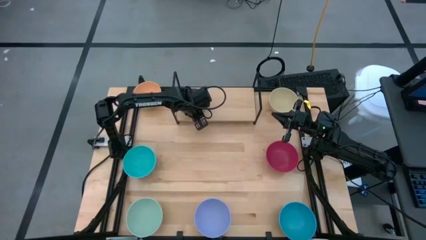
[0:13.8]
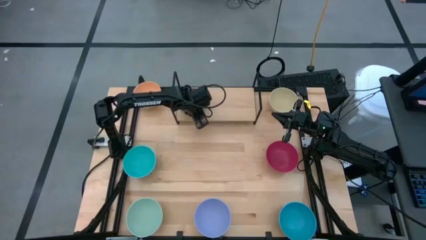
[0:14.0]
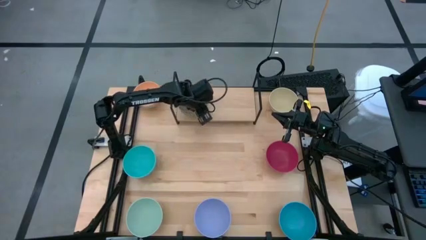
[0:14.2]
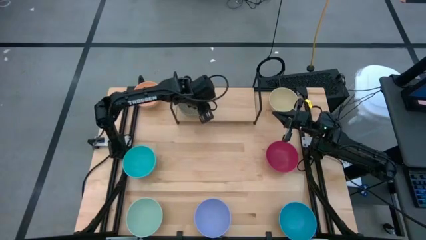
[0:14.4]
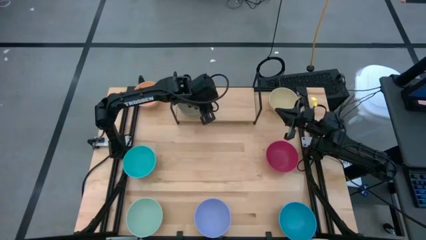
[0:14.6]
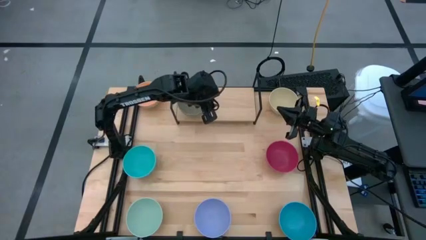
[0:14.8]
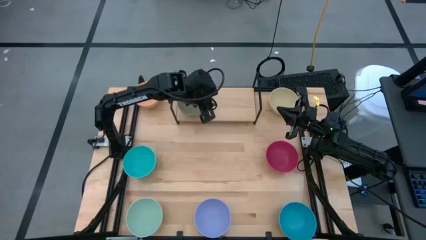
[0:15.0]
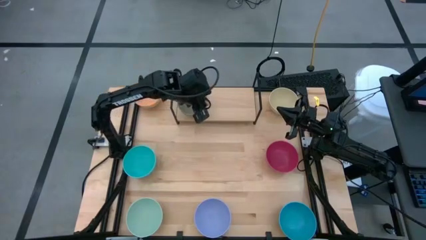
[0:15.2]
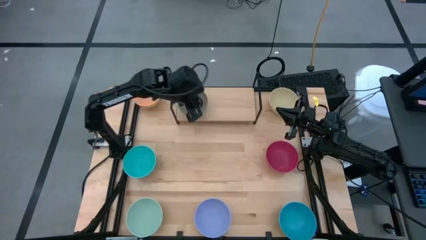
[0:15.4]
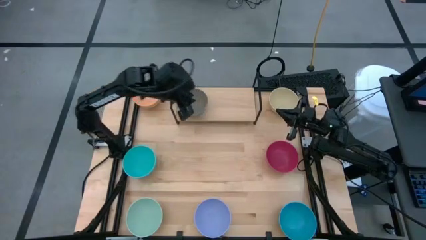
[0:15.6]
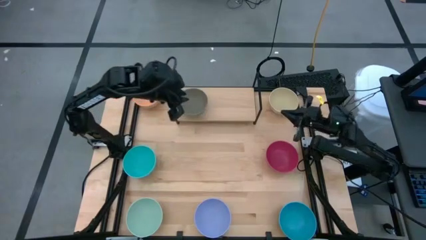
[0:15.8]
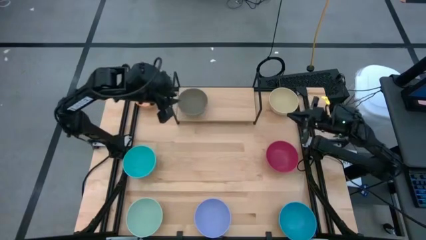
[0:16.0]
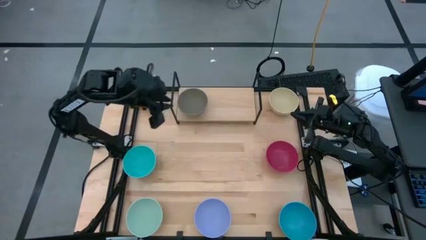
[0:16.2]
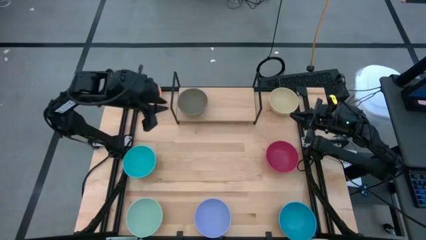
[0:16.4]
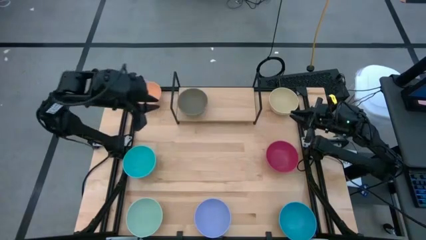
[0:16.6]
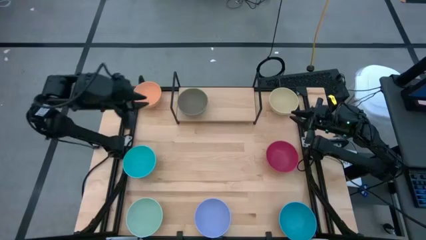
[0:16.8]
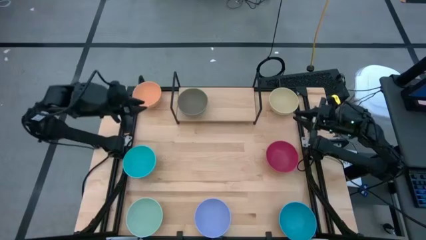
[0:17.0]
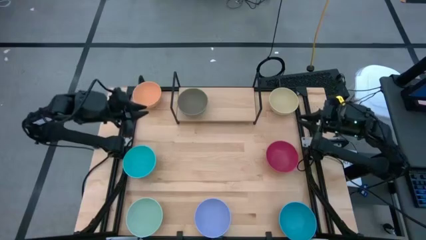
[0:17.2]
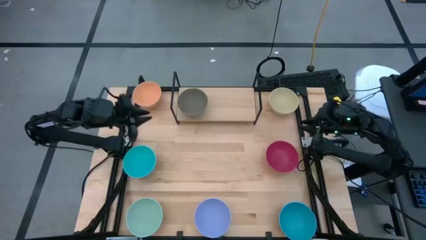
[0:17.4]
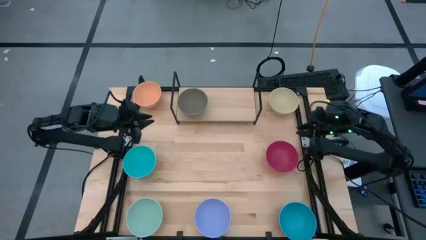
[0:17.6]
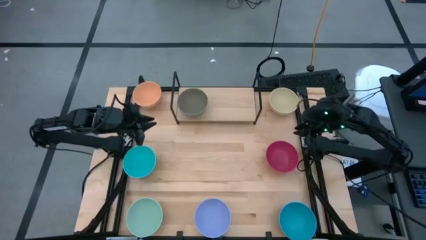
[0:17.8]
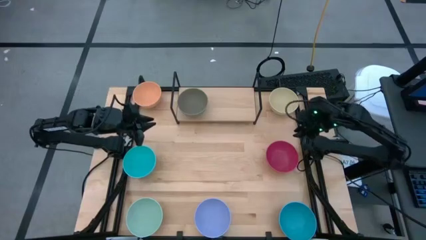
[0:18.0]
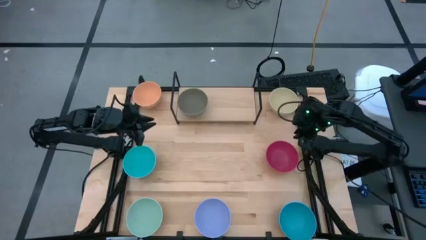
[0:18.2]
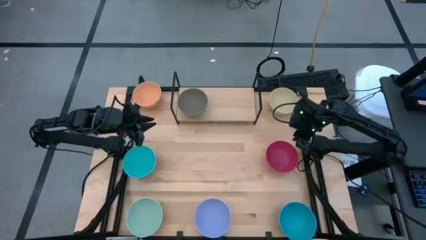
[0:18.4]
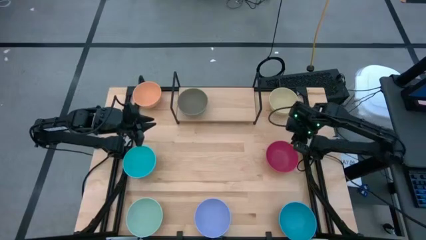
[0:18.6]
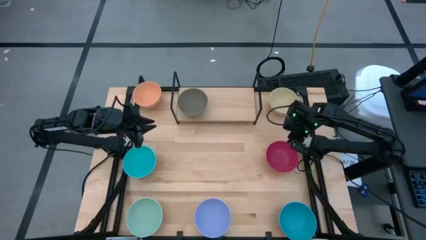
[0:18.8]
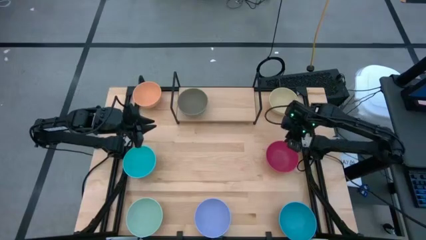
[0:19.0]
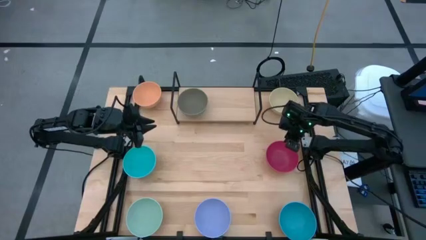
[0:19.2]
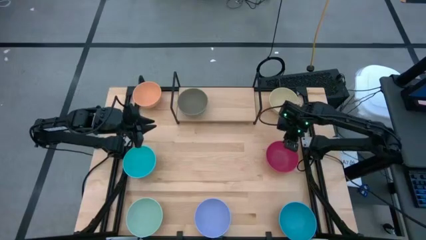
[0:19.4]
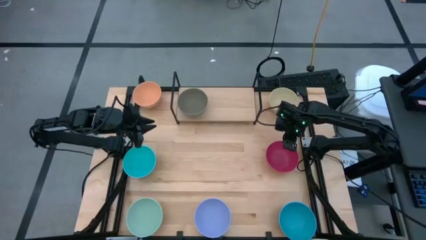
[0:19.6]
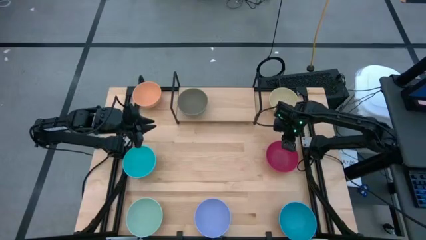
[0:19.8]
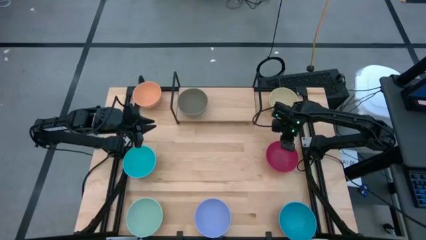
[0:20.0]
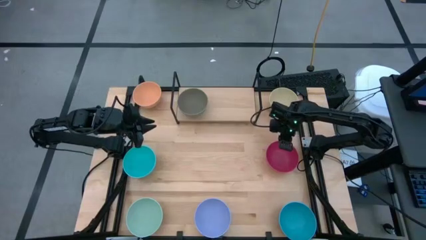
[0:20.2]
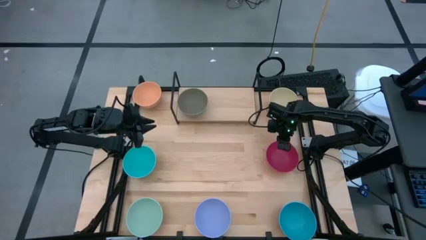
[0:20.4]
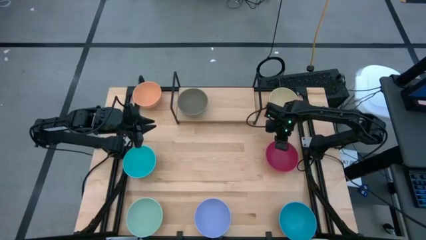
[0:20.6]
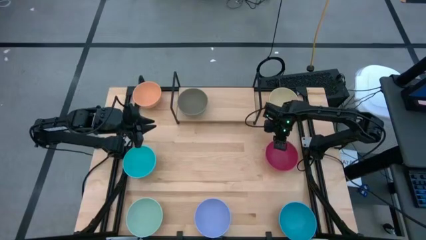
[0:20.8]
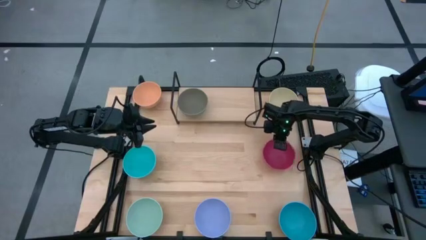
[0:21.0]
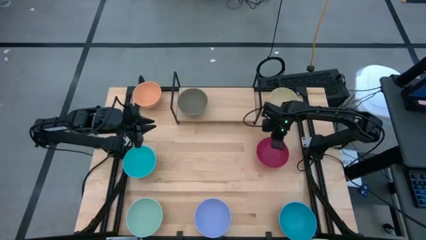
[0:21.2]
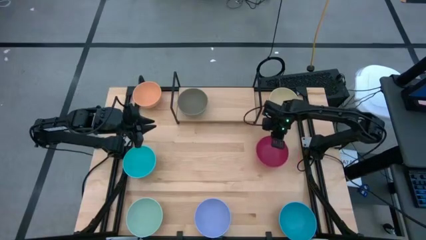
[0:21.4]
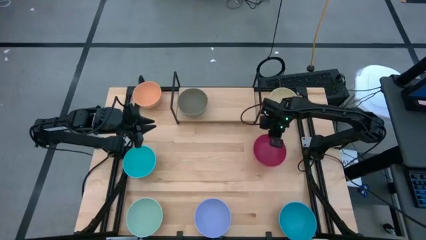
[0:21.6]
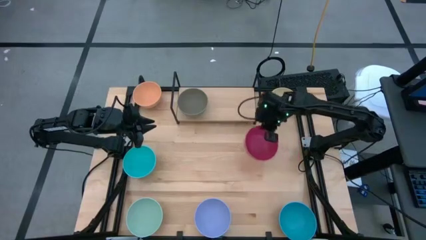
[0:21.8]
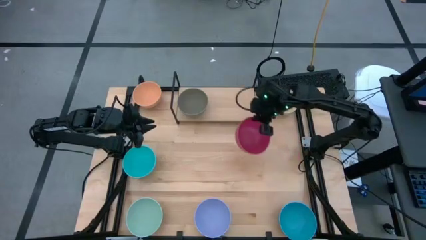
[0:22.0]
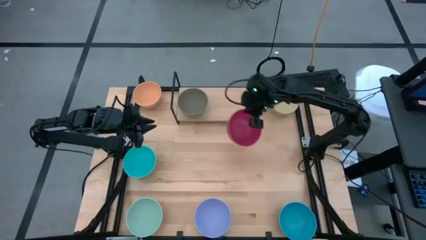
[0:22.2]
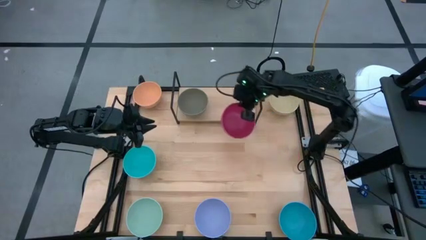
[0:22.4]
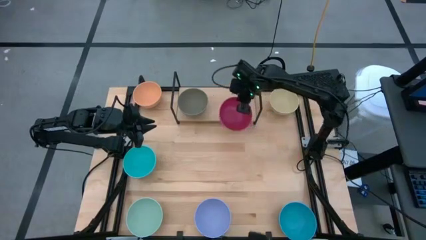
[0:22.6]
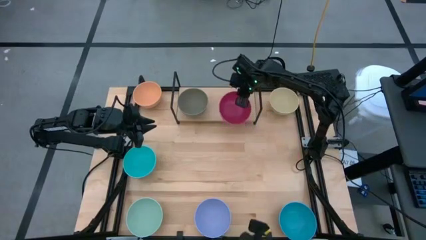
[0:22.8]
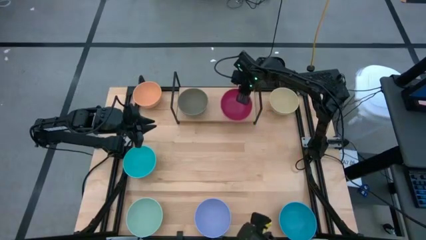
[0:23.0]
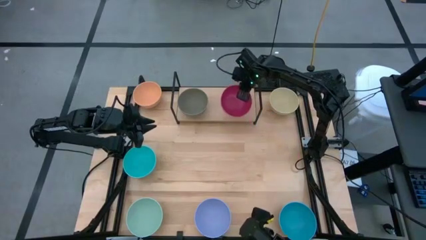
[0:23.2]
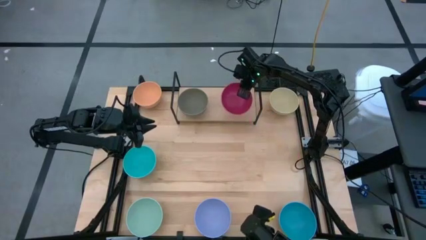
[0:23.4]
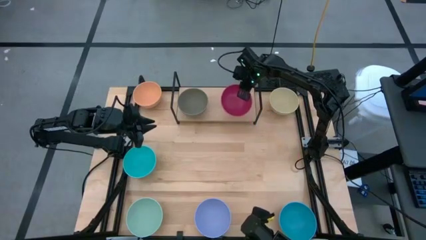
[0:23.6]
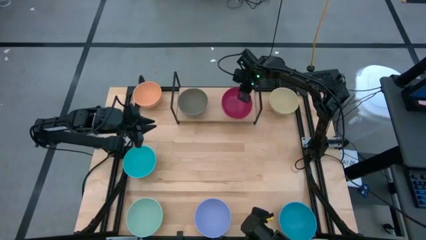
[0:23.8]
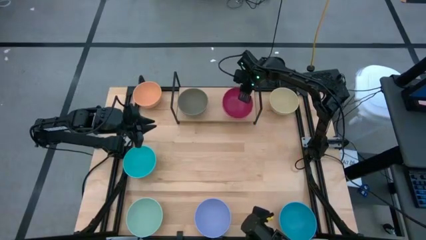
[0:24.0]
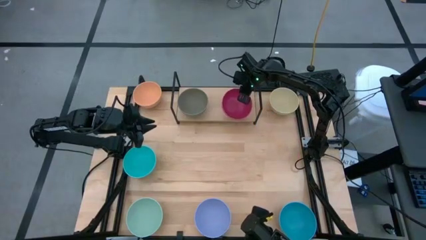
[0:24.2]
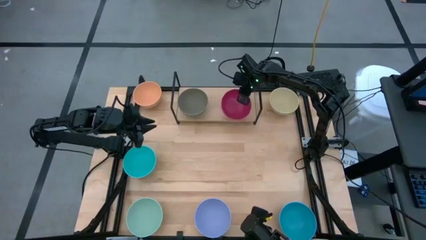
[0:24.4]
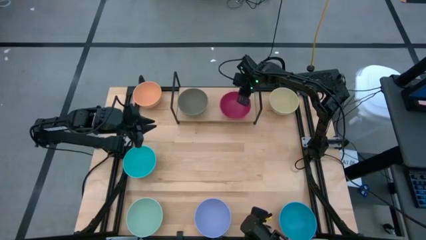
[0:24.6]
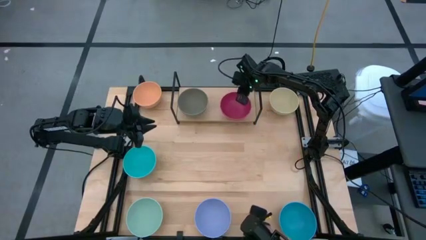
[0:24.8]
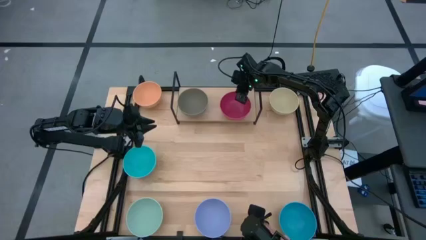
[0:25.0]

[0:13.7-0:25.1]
Task: Place and stack bowls onto a shelf
Put the pink bowl on the shelf
